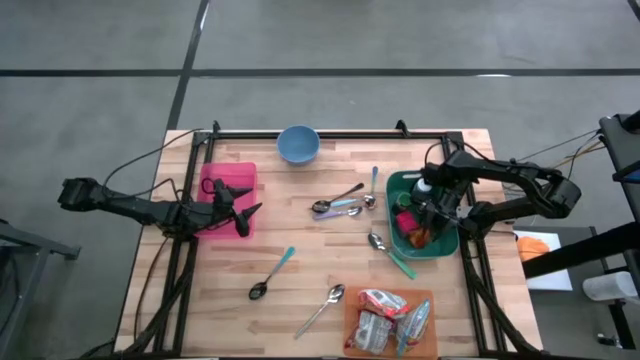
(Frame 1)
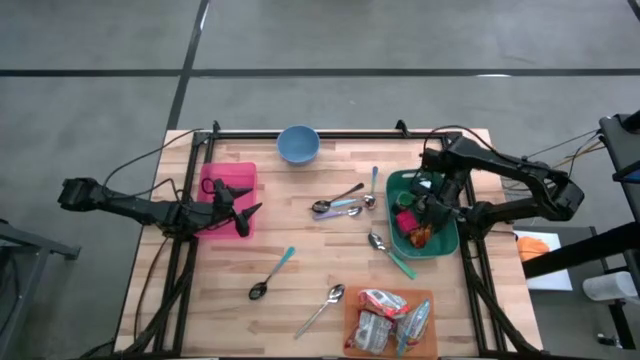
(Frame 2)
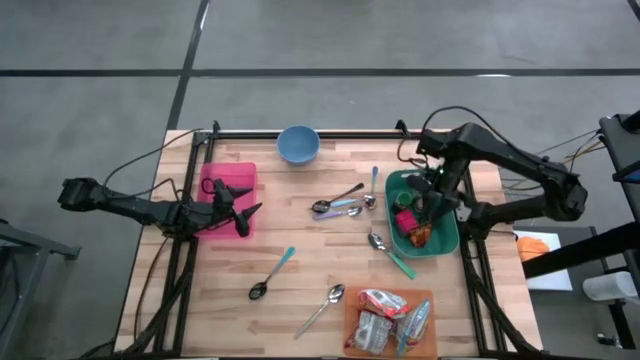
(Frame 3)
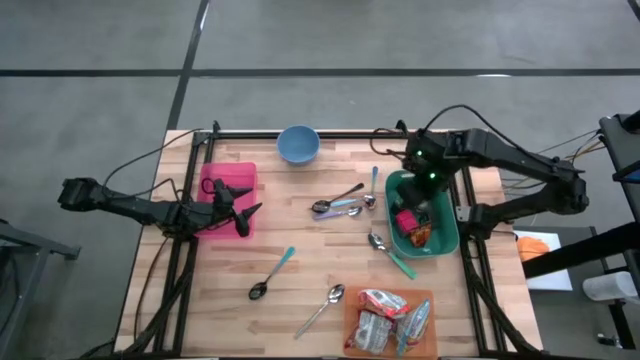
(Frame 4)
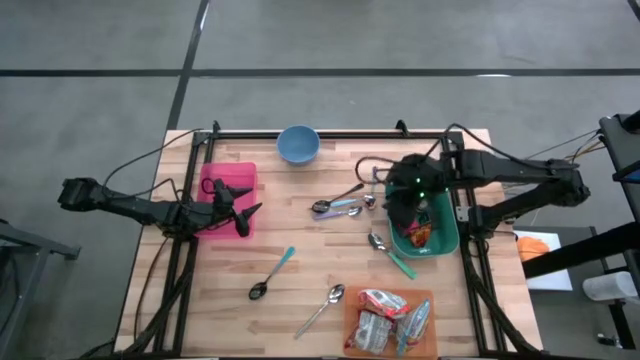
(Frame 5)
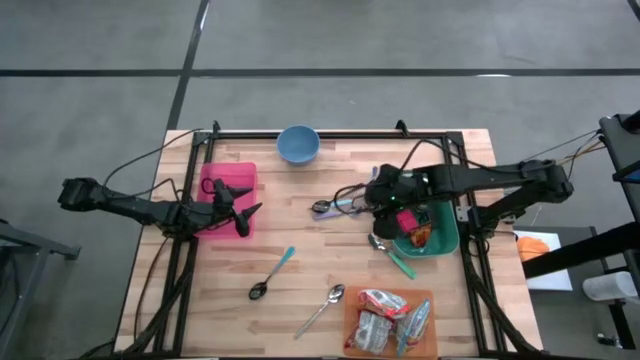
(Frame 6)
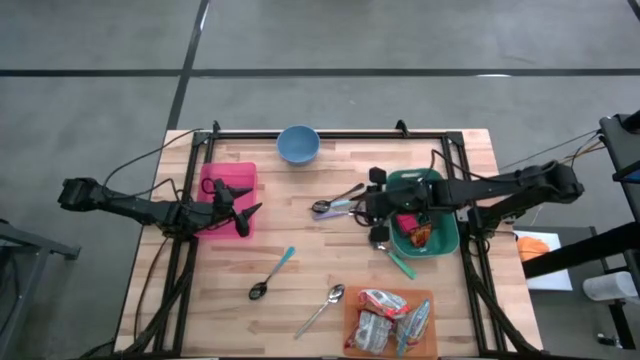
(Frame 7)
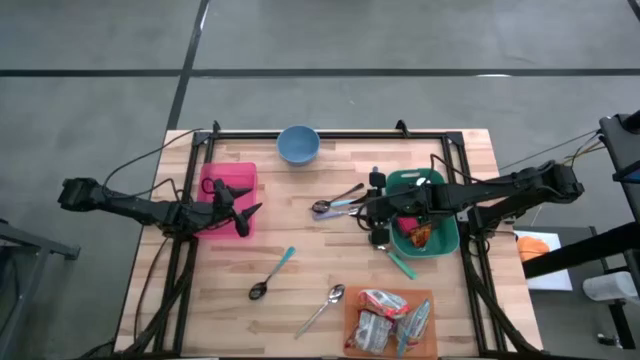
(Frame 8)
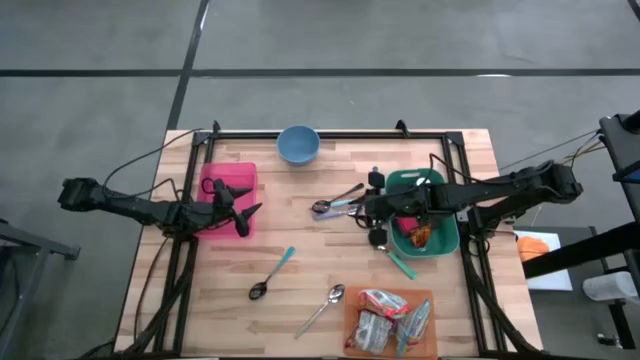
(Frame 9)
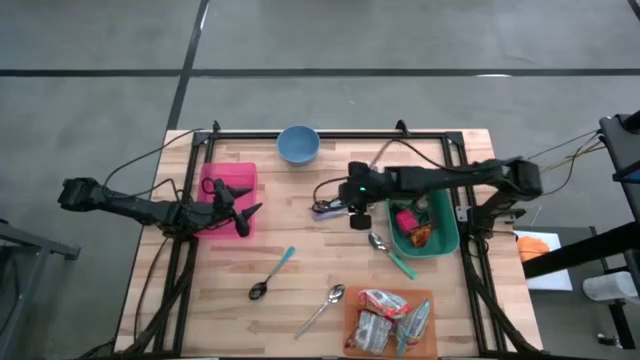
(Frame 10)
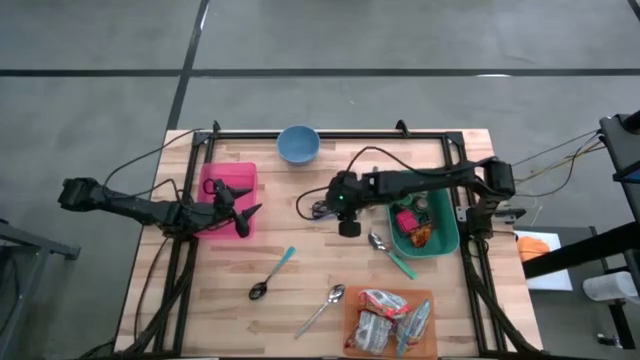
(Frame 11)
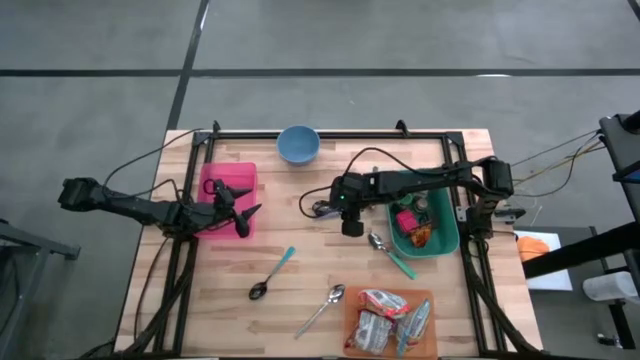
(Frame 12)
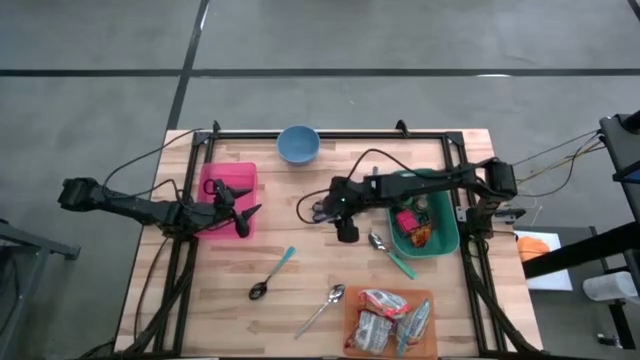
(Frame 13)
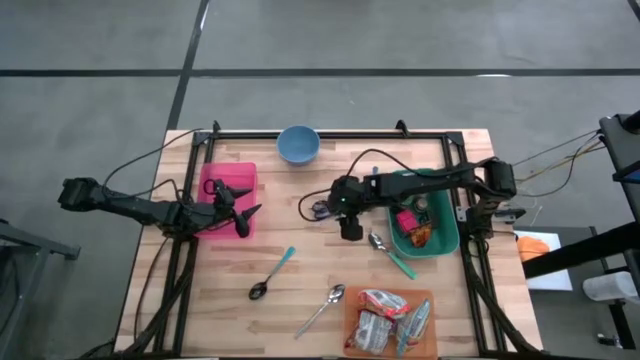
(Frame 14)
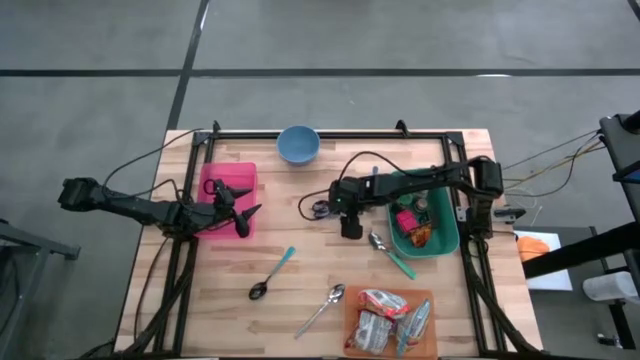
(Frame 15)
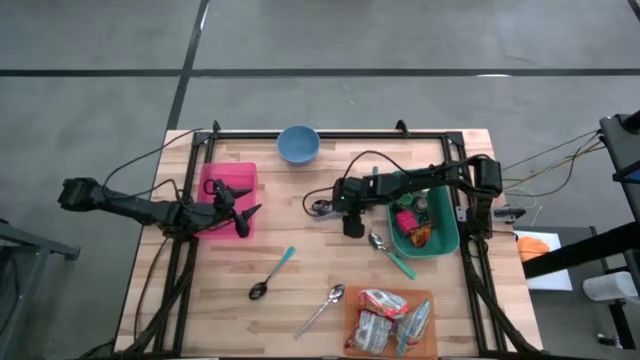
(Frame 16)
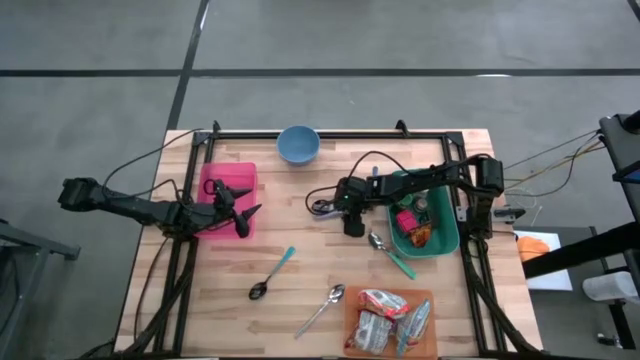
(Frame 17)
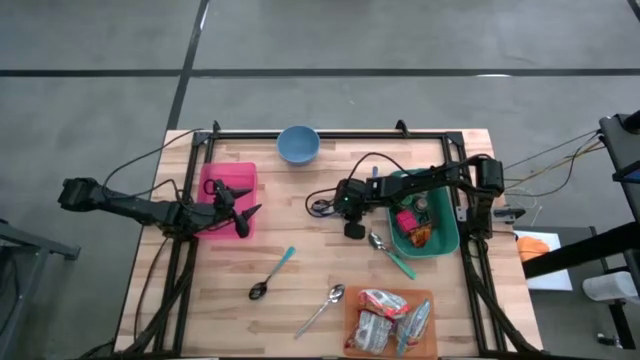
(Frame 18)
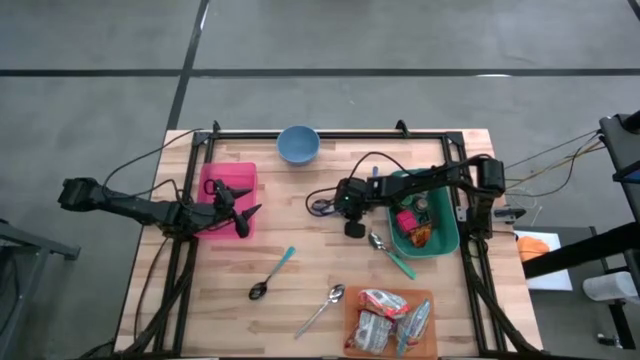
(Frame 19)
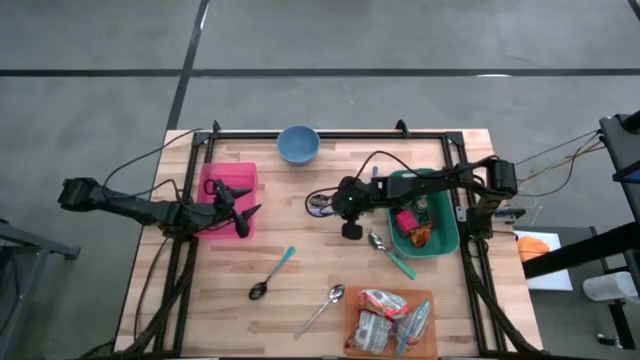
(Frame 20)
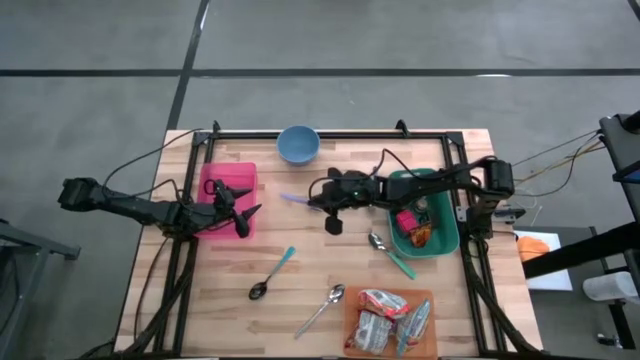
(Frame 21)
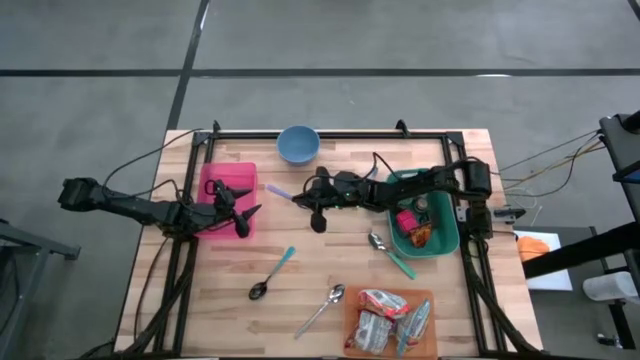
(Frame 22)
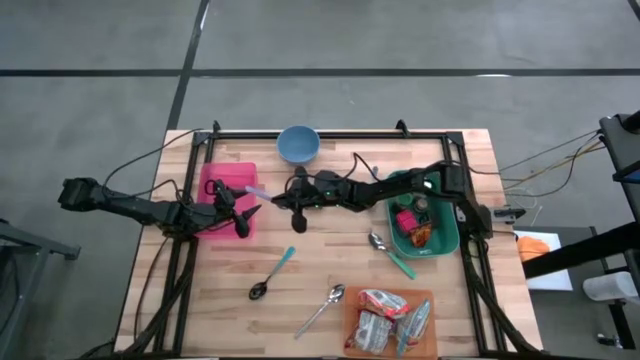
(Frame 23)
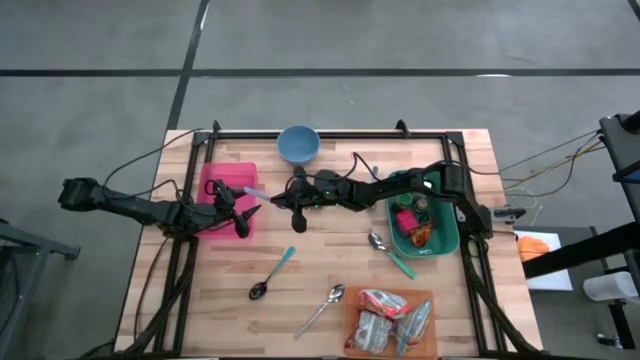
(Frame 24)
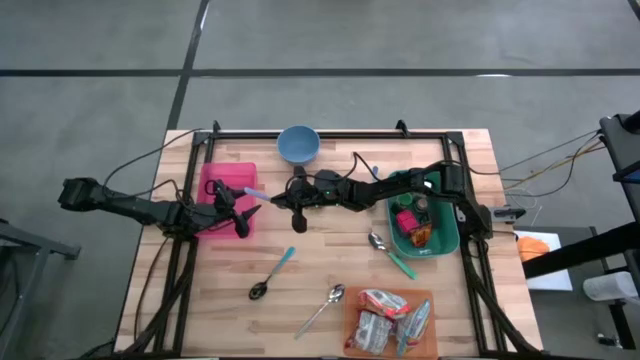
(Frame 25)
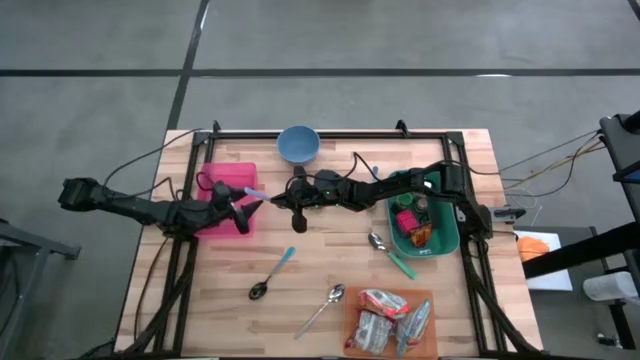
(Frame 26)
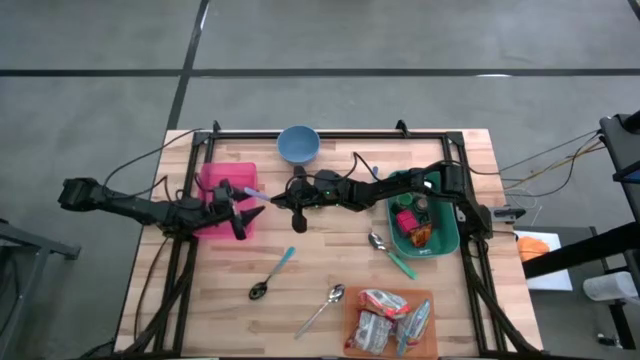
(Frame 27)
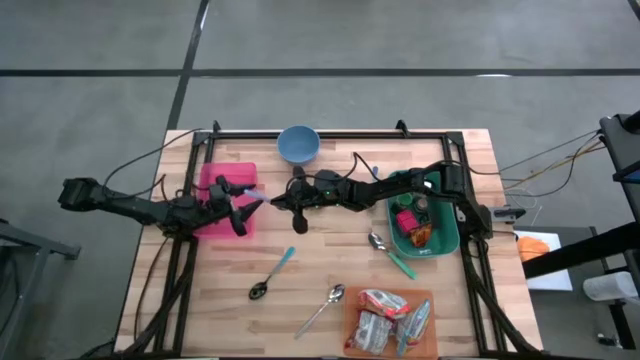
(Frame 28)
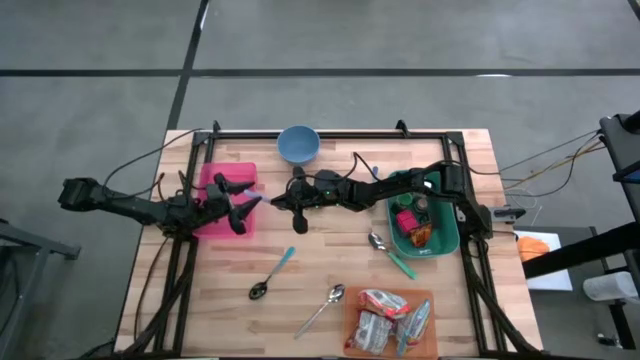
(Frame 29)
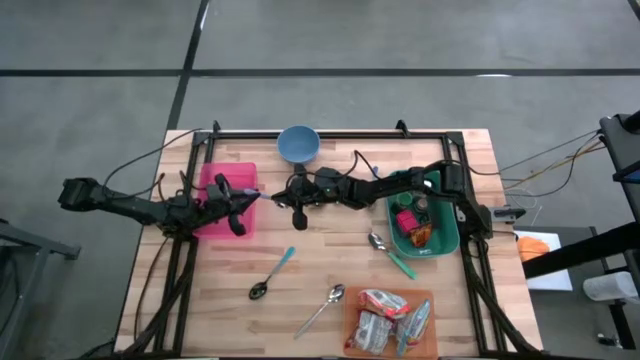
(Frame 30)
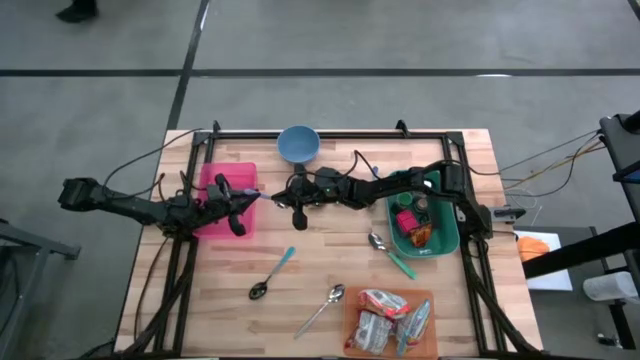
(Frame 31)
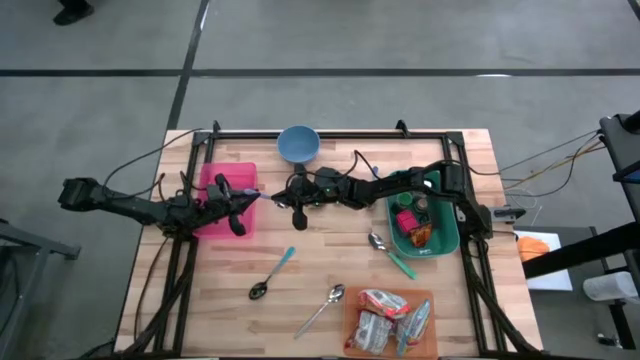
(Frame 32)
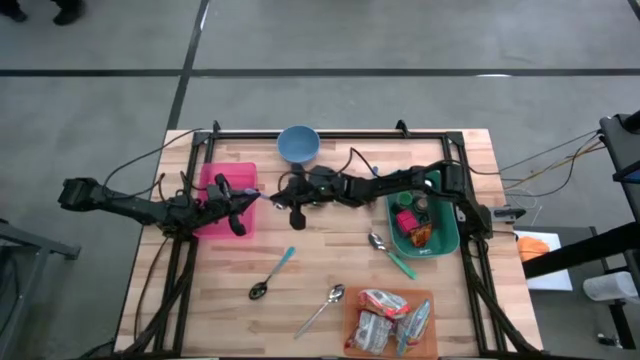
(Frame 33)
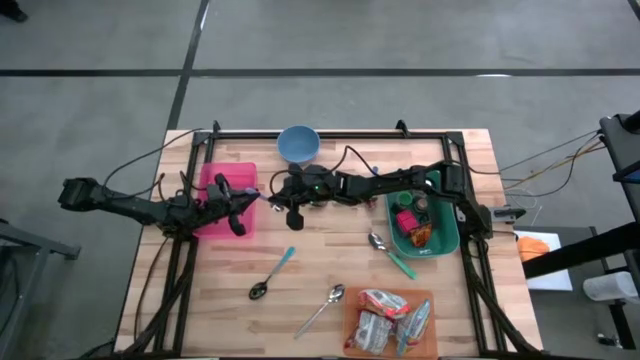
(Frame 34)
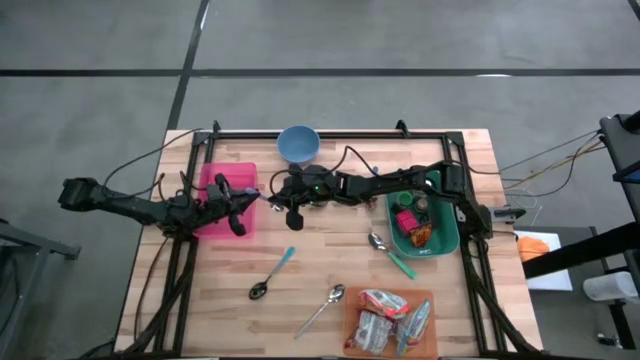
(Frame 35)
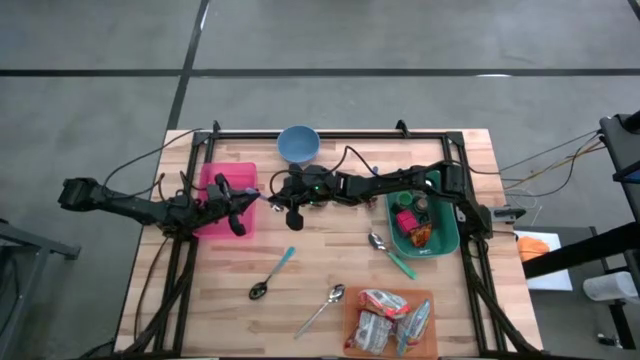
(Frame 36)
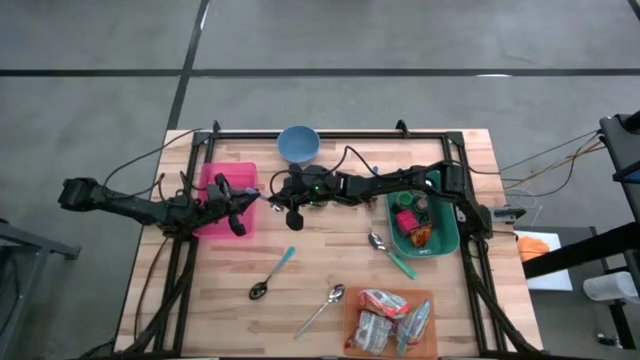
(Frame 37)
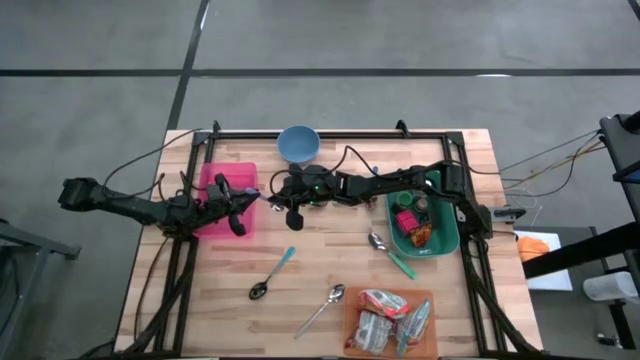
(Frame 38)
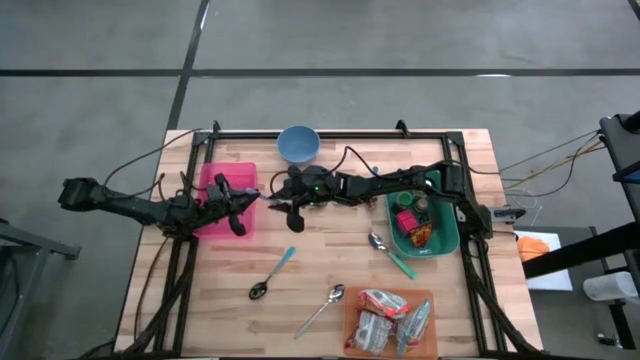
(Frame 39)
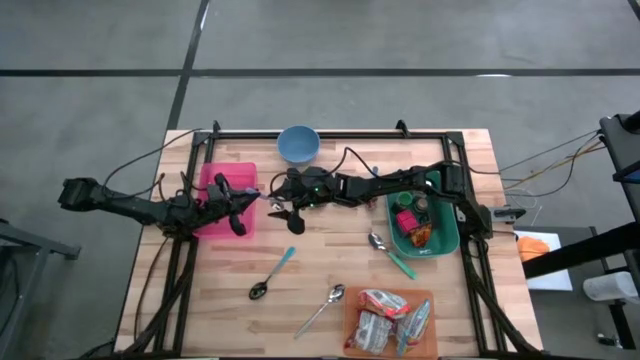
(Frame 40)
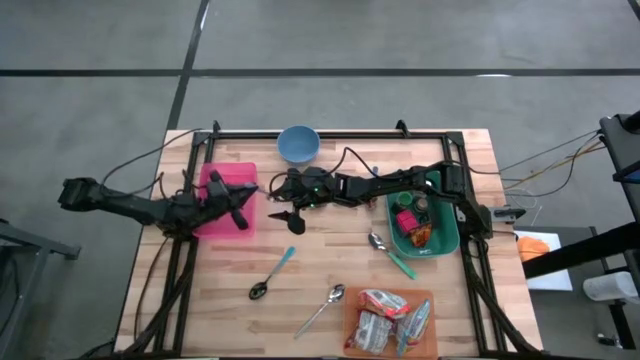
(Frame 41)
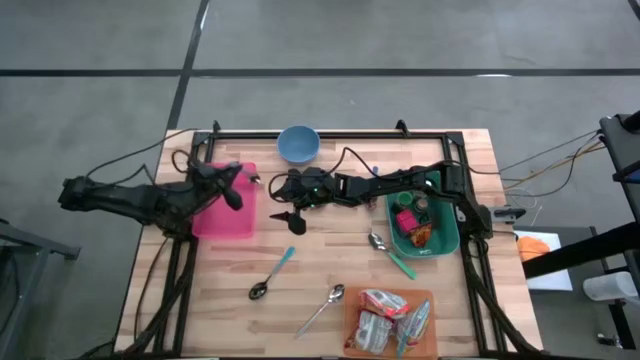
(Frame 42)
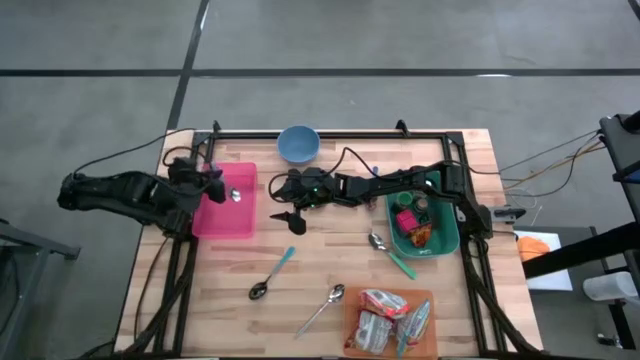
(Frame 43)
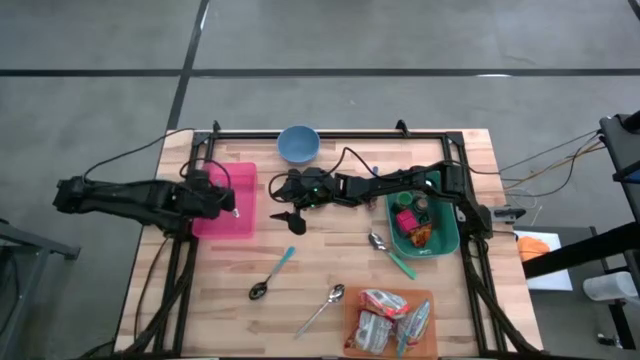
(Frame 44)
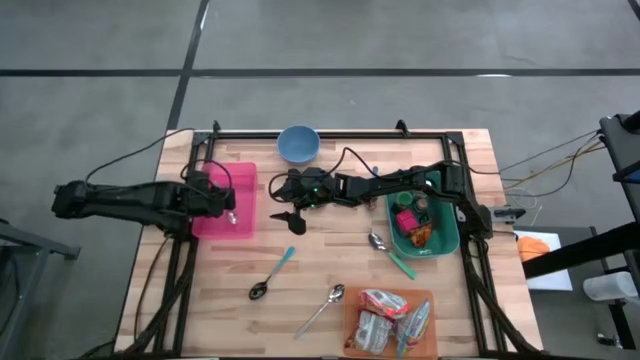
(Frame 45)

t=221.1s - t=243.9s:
Put the purple spoon into the pink bin
